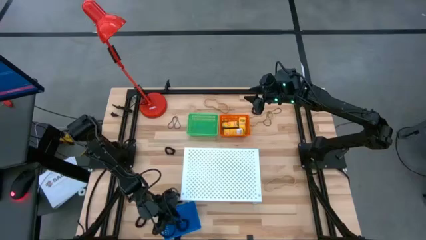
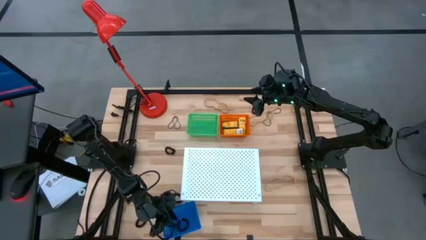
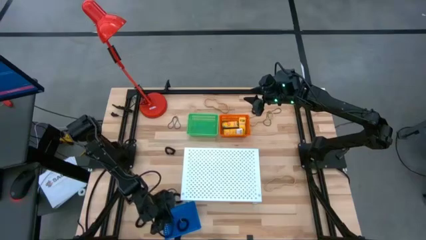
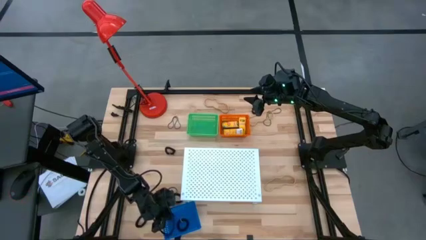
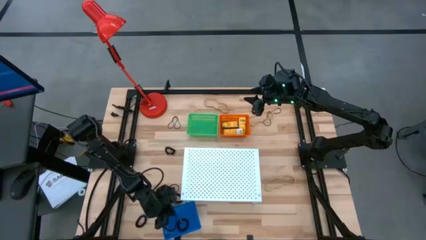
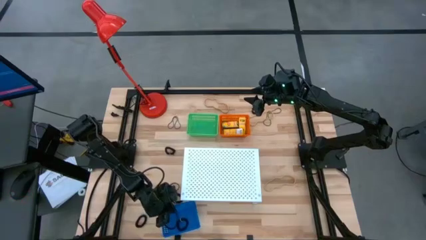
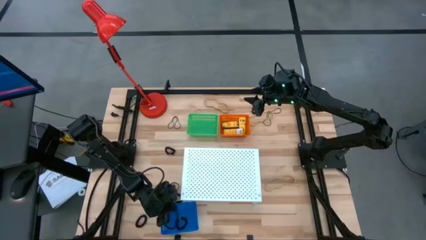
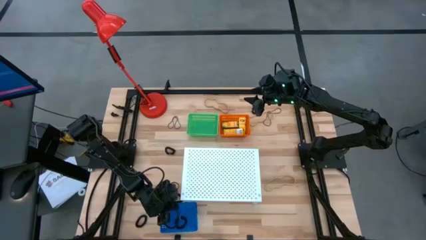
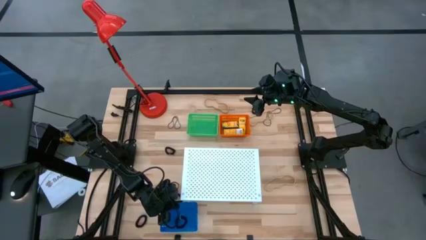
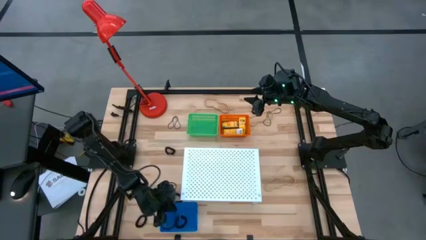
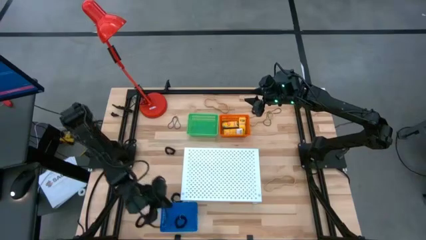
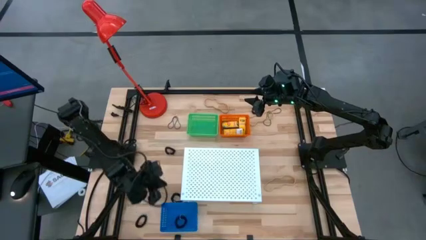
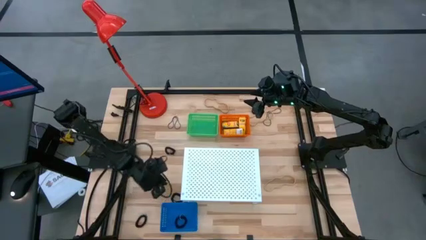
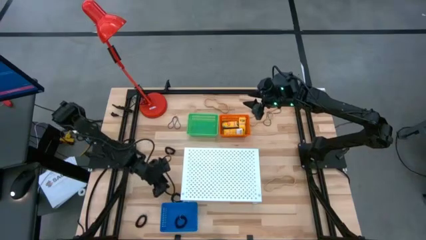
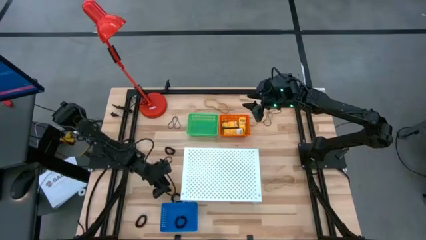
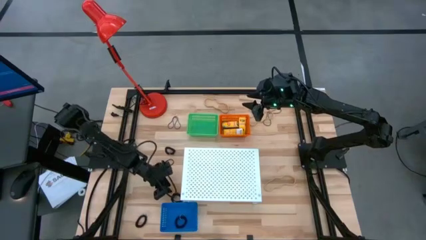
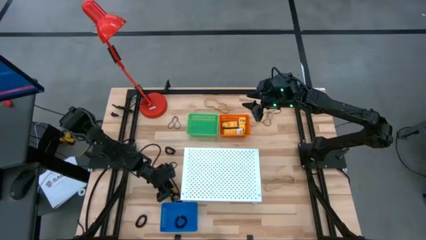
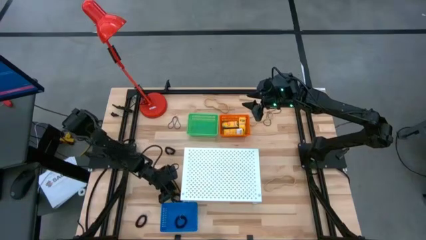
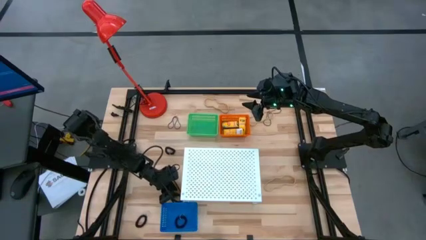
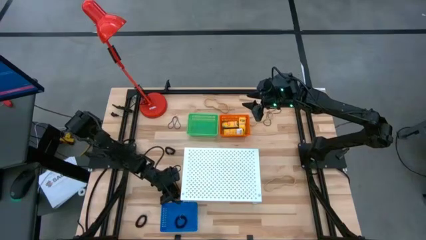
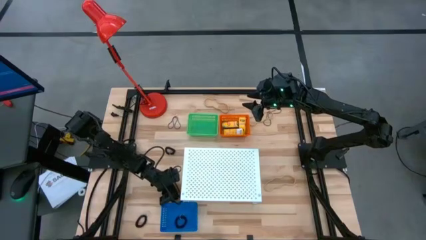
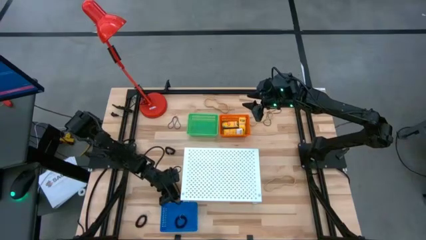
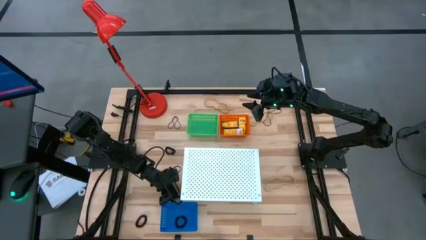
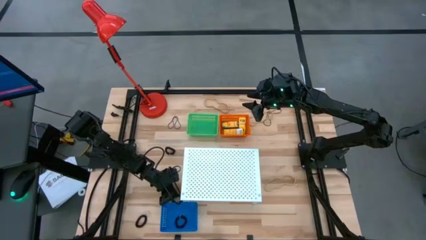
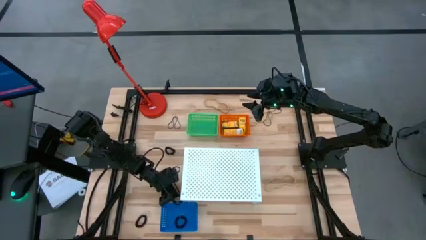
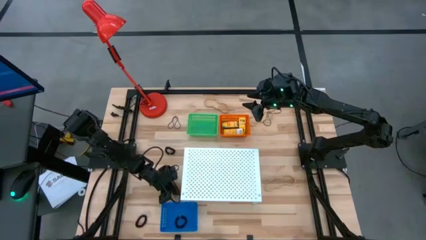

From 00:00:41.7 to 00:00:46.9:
Task: Pick & Place Office Desk Supplies
Put the black spring keychain into the blue bin

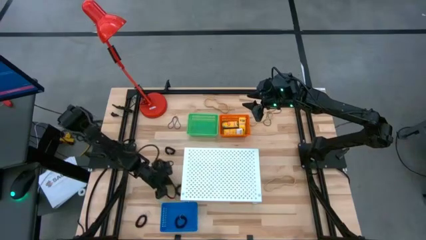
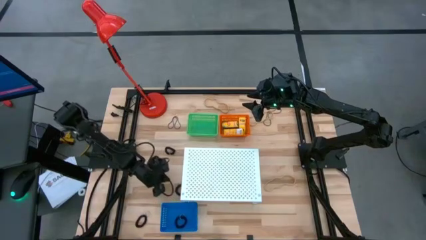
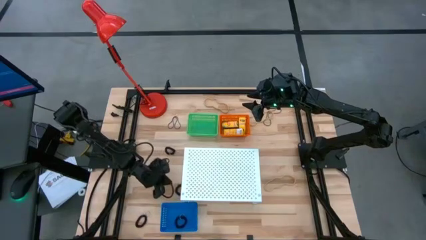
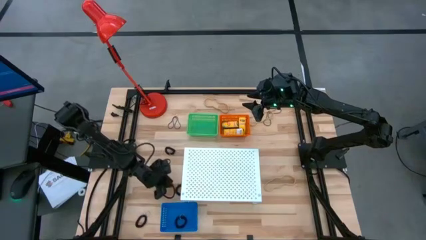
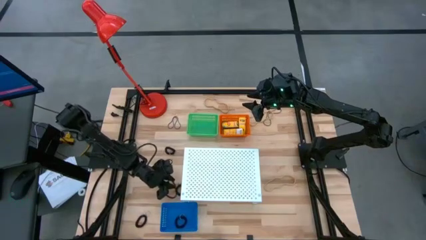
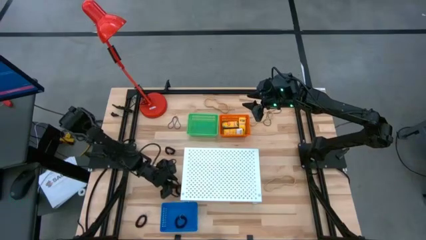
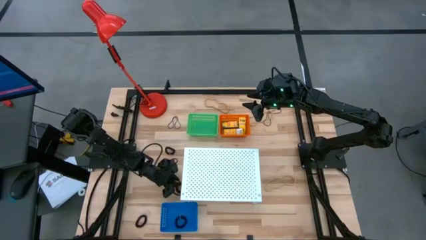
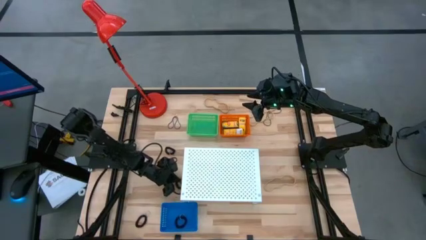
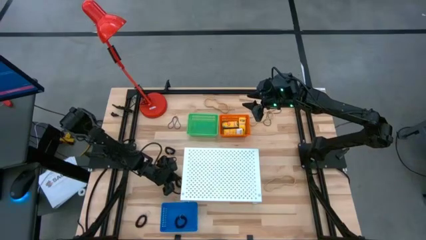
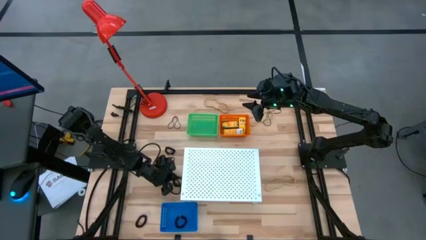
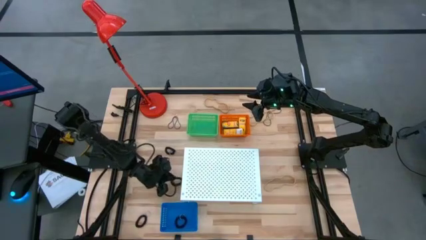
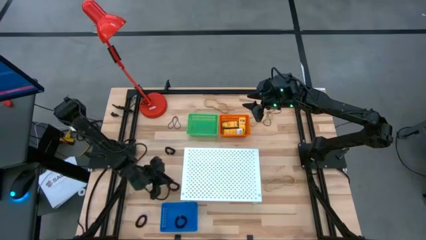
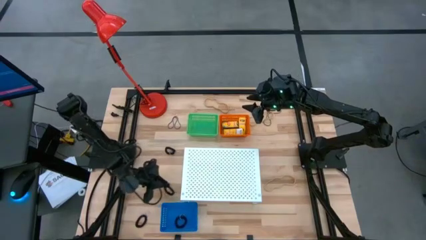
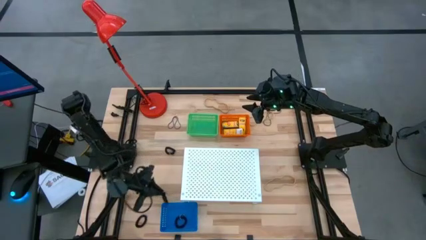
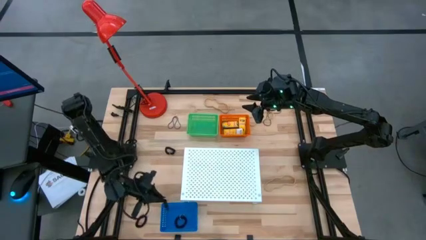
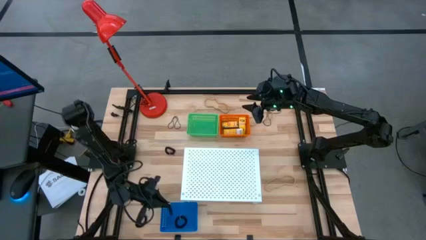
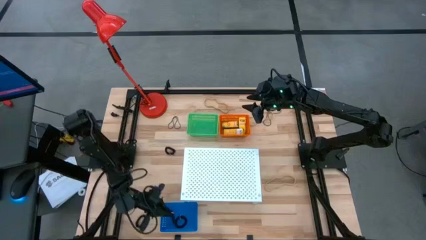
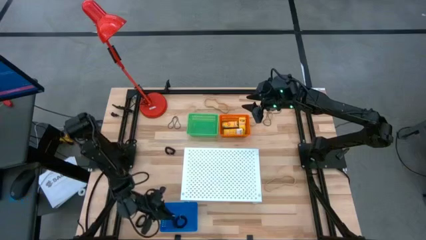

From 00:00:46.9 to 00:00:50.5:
Put the black spring keychain into the blue bin

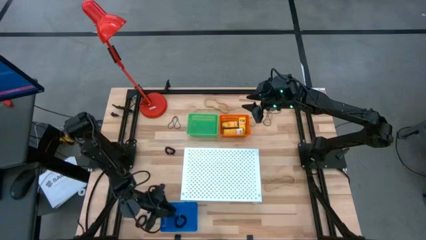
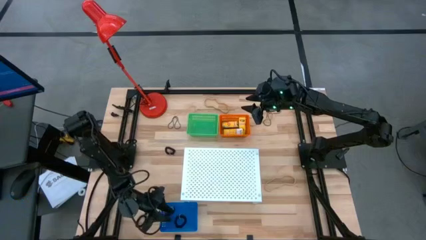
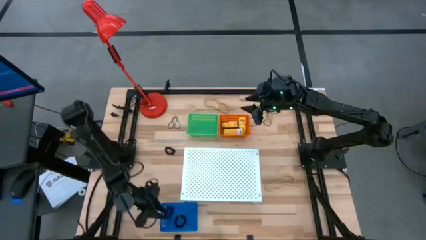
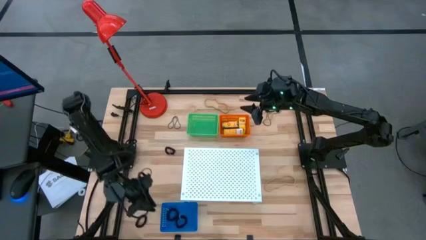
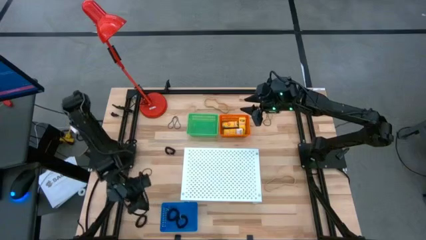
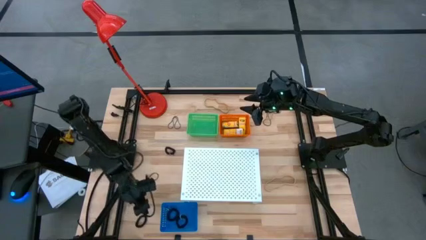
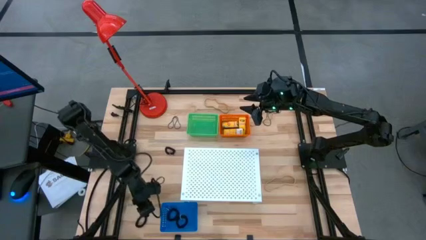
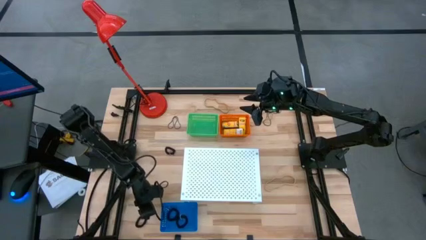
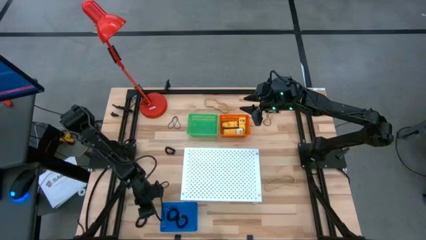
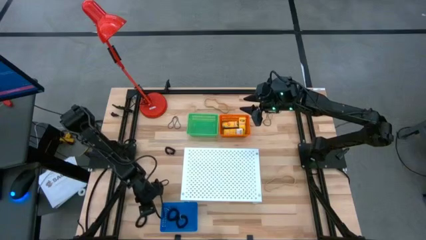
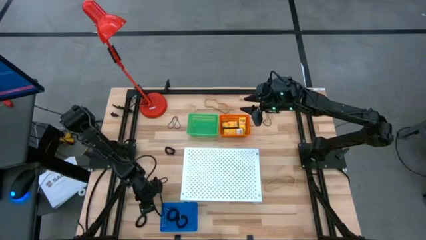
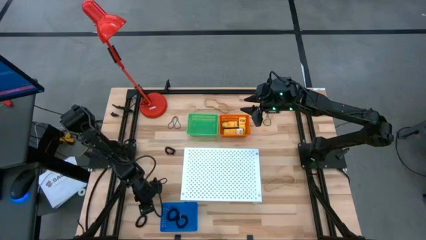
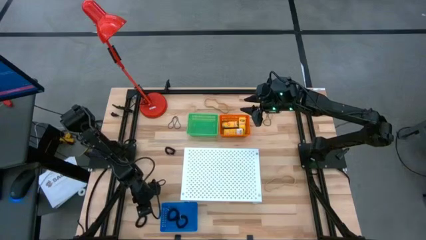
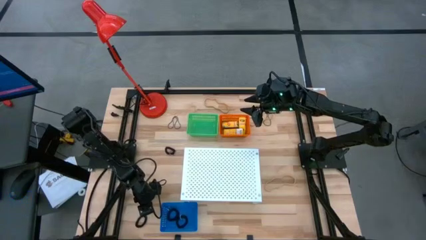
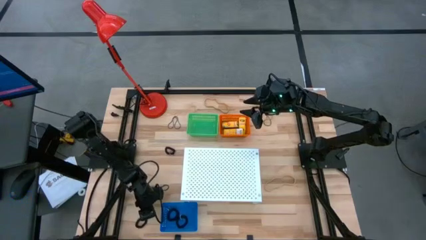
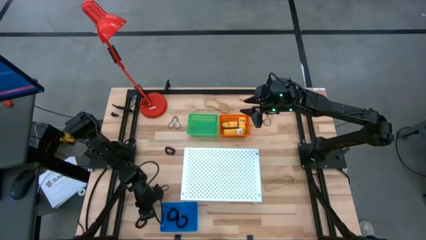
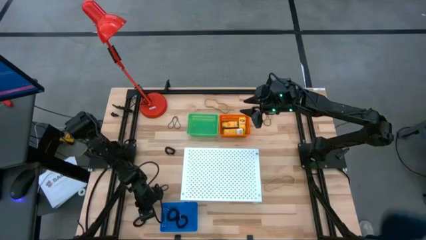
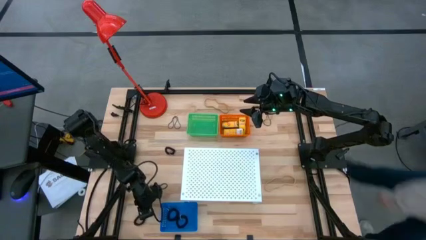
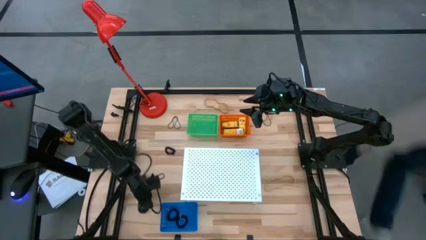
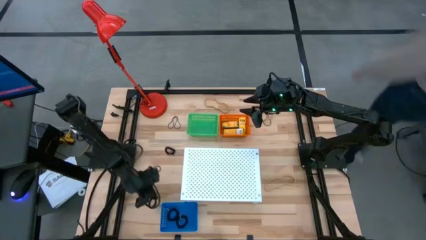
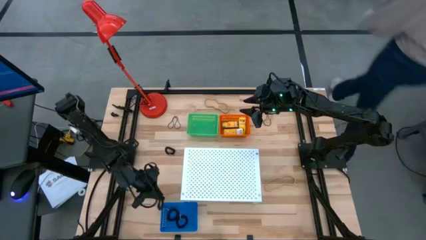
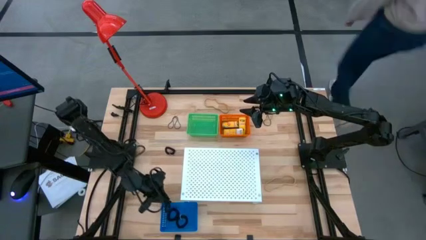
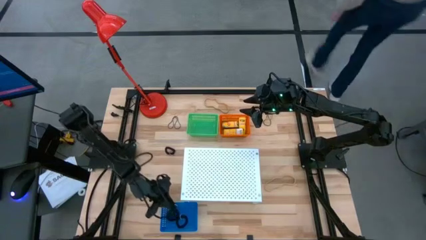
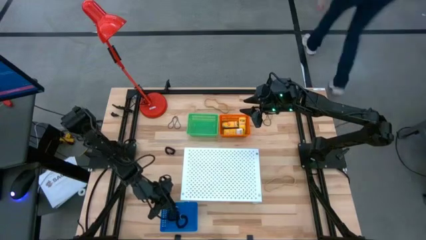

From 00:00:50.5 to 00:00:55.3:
Put the black spring keychain into the blue bin

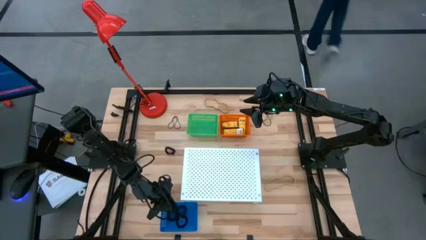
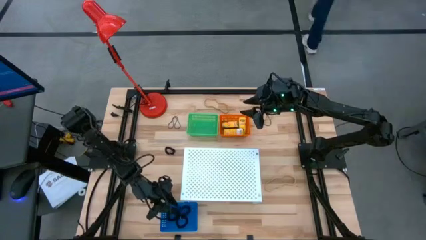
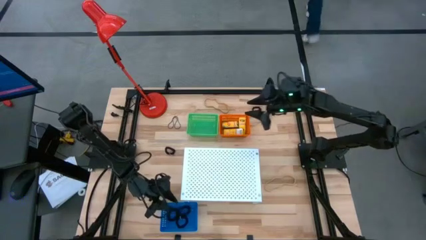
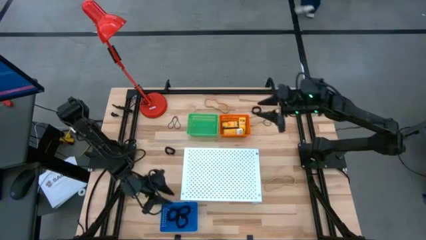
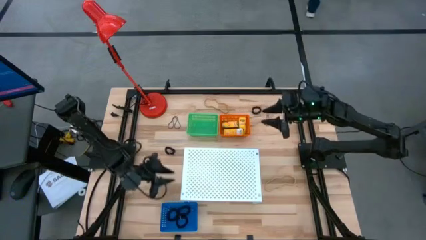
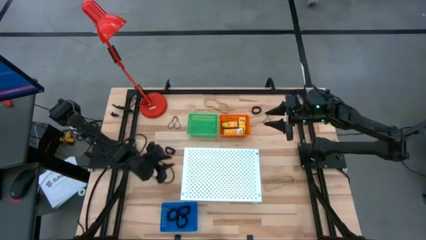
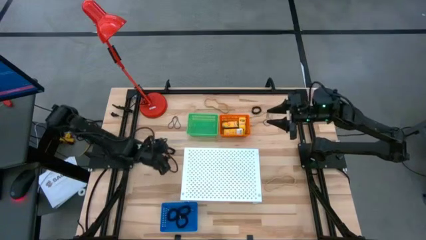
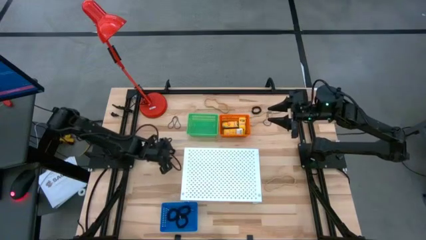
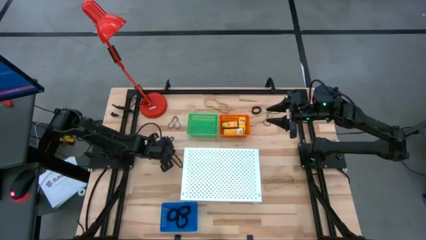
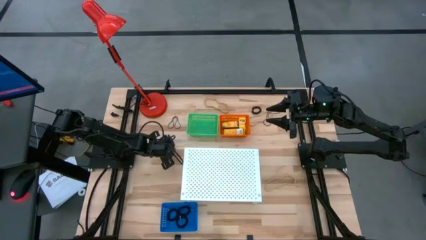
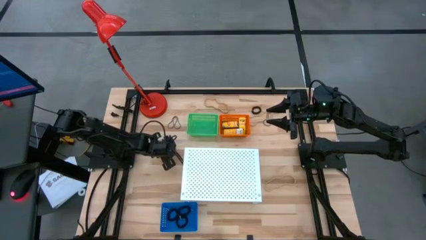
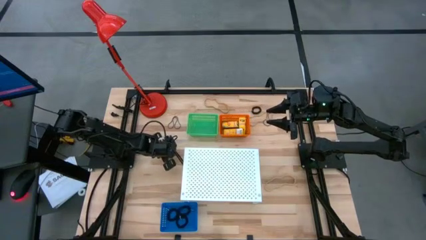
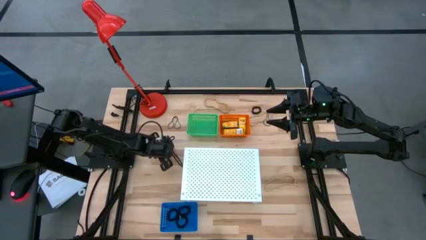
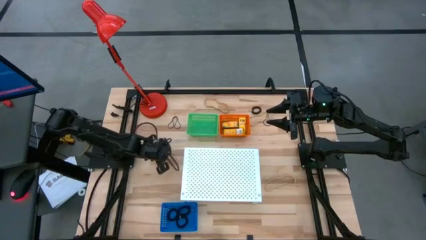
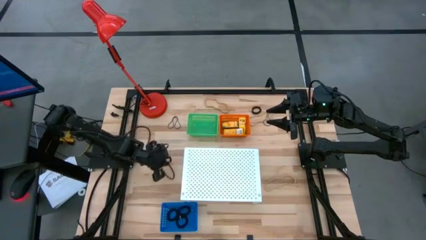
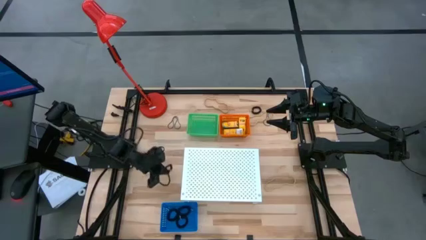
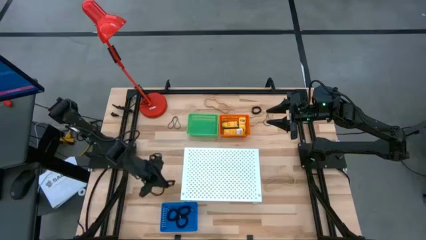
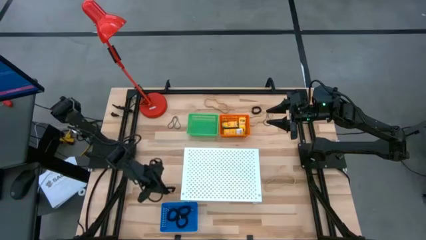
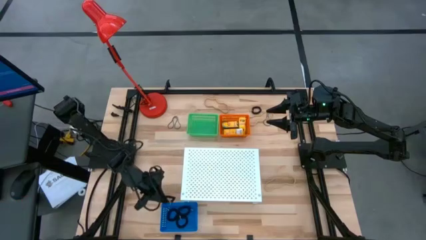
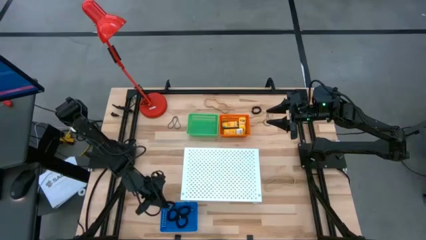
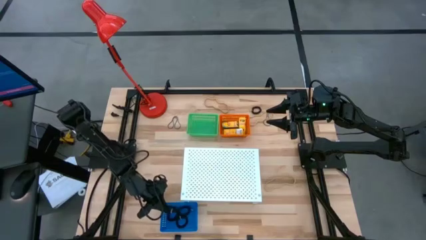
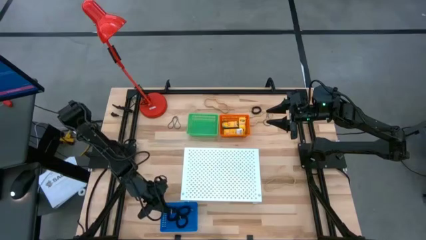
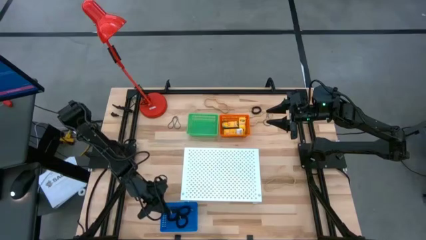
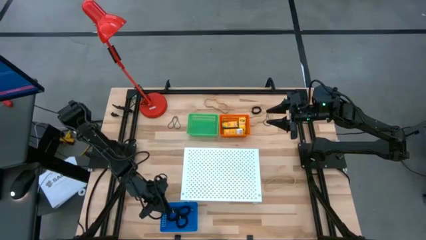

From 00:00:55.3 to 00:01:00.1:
Put the black spring keychain into the blue bin
